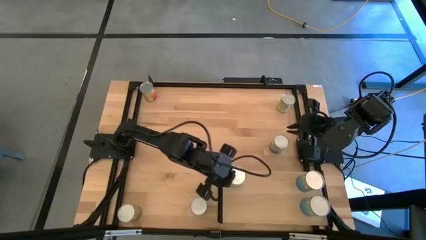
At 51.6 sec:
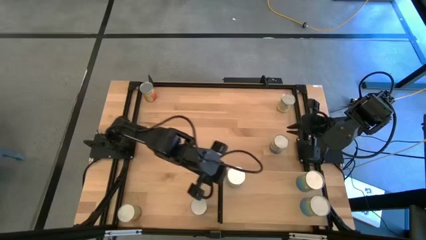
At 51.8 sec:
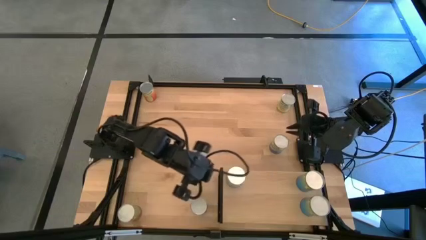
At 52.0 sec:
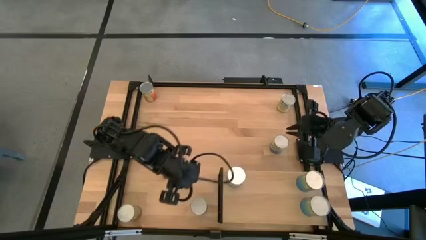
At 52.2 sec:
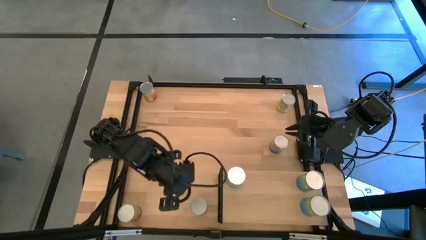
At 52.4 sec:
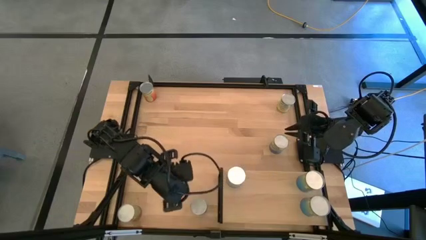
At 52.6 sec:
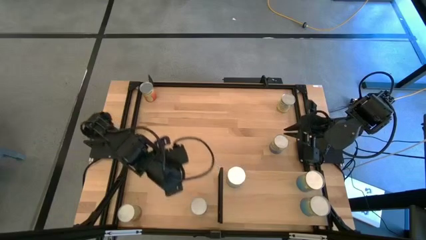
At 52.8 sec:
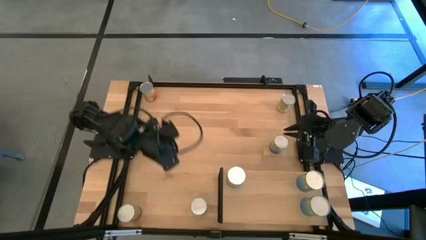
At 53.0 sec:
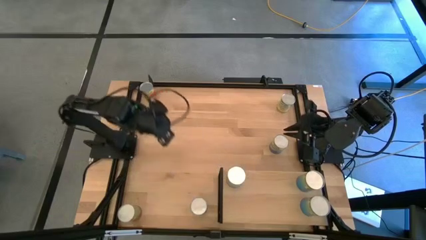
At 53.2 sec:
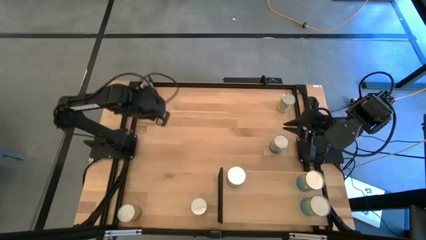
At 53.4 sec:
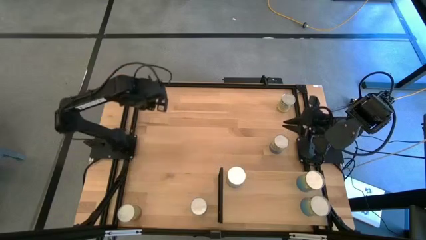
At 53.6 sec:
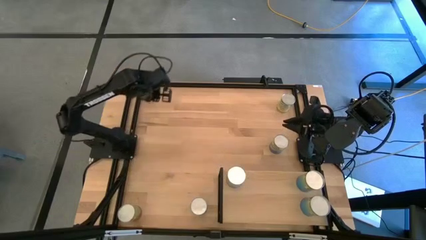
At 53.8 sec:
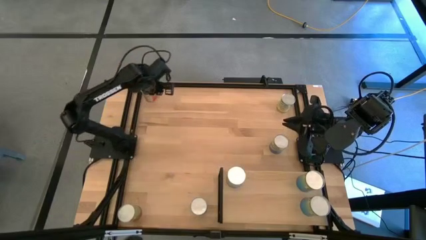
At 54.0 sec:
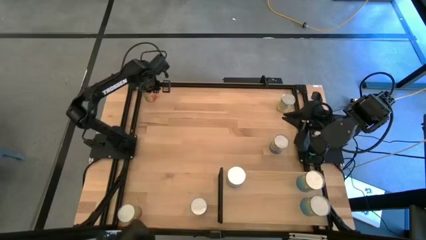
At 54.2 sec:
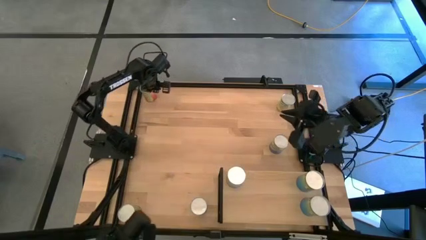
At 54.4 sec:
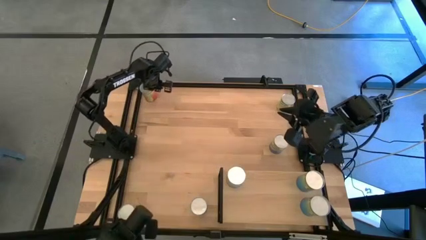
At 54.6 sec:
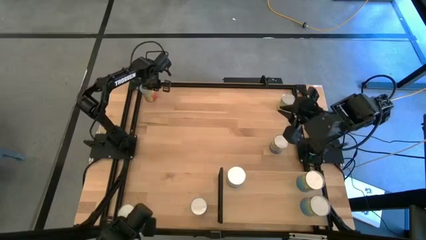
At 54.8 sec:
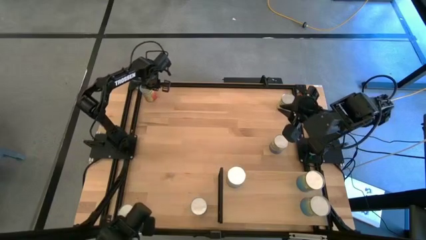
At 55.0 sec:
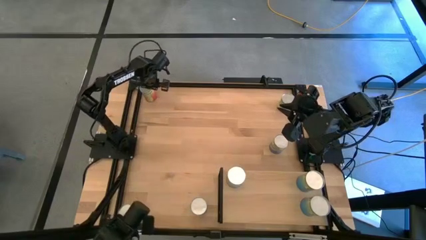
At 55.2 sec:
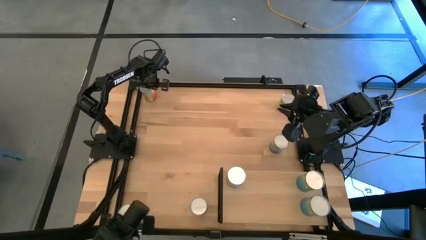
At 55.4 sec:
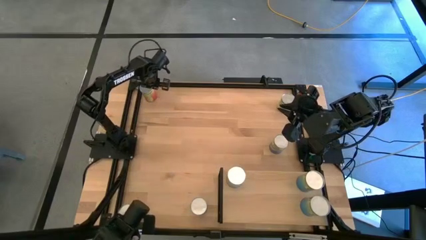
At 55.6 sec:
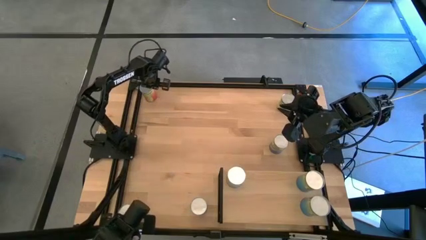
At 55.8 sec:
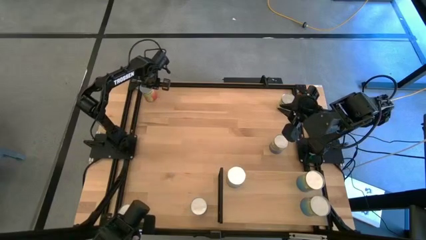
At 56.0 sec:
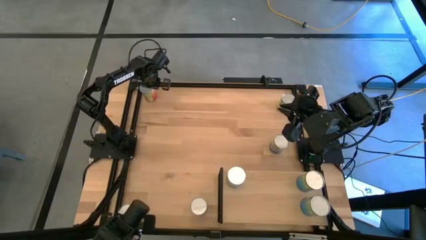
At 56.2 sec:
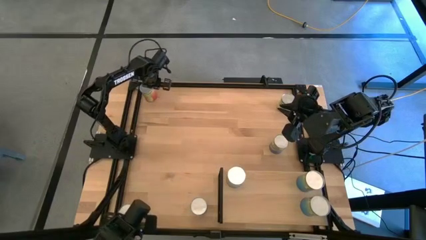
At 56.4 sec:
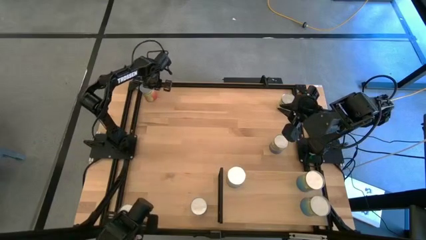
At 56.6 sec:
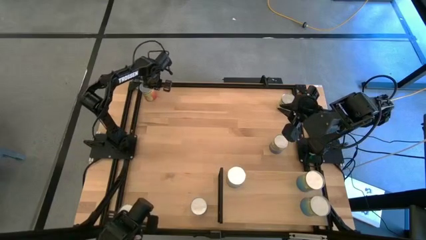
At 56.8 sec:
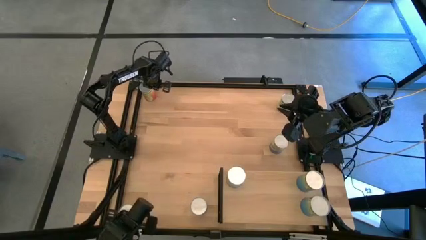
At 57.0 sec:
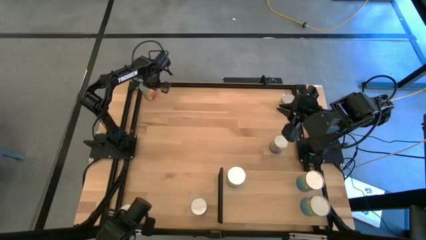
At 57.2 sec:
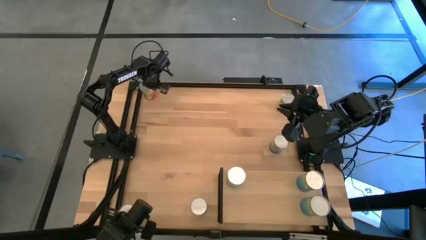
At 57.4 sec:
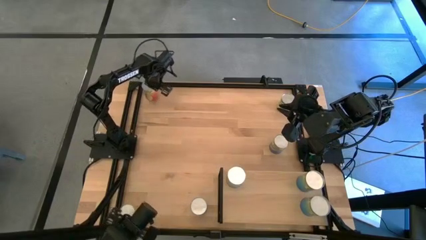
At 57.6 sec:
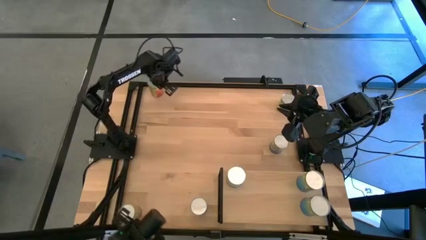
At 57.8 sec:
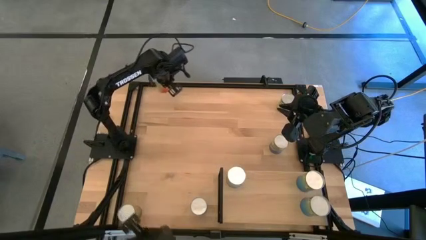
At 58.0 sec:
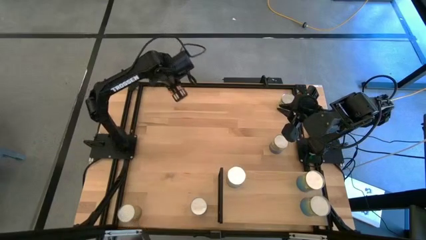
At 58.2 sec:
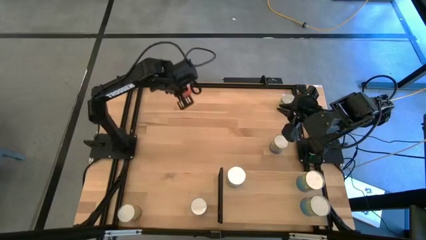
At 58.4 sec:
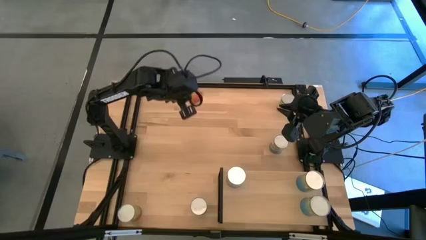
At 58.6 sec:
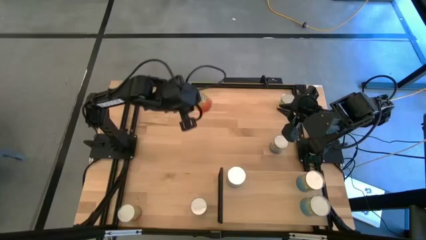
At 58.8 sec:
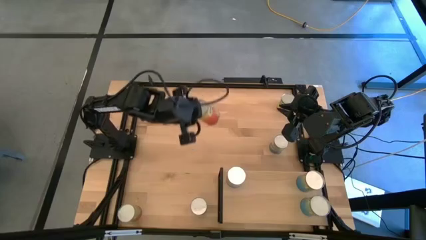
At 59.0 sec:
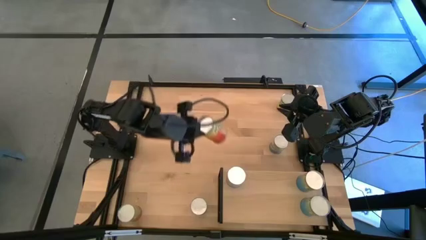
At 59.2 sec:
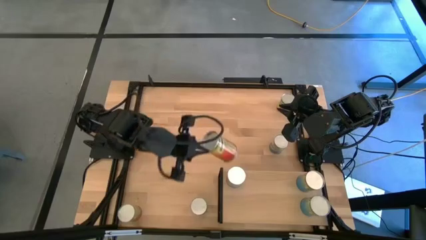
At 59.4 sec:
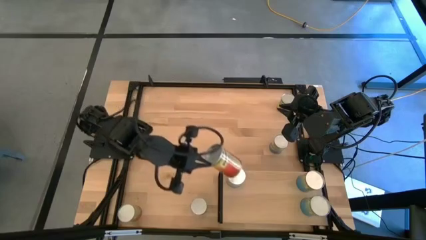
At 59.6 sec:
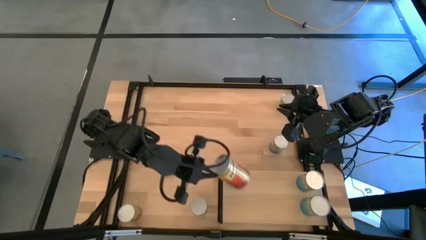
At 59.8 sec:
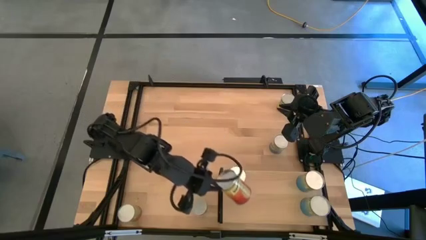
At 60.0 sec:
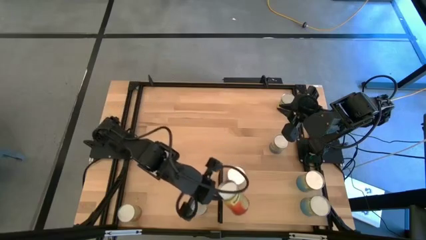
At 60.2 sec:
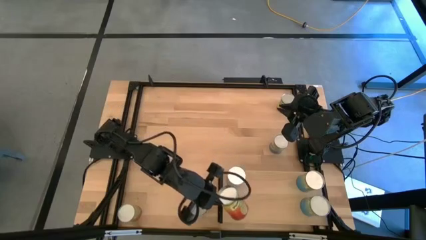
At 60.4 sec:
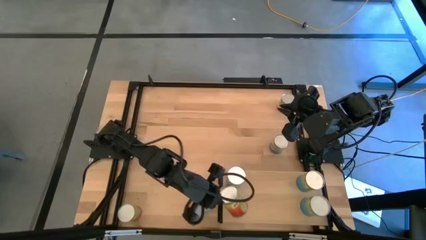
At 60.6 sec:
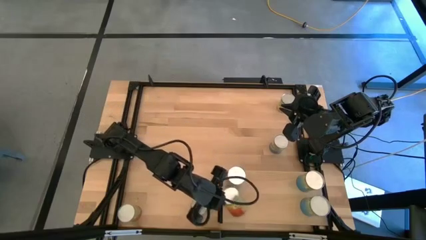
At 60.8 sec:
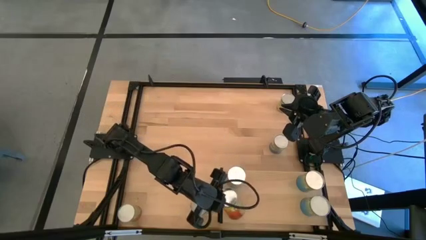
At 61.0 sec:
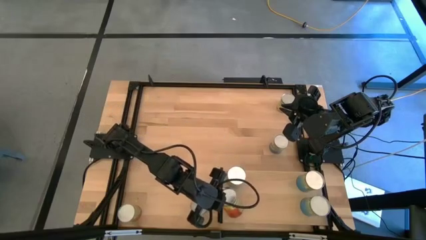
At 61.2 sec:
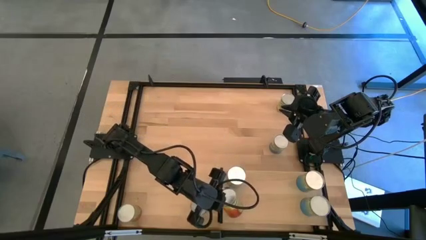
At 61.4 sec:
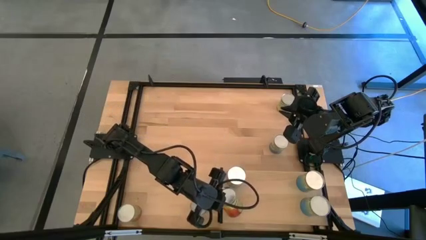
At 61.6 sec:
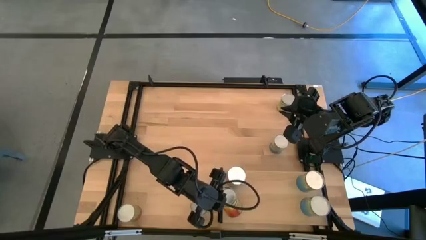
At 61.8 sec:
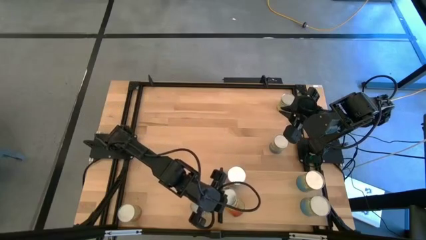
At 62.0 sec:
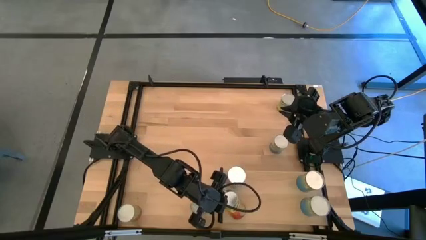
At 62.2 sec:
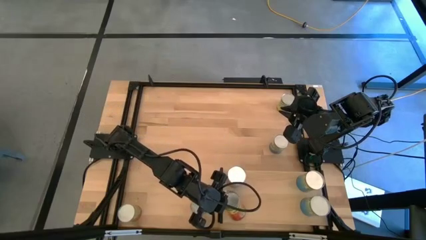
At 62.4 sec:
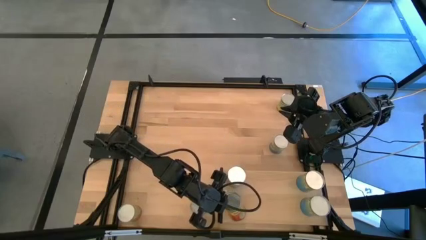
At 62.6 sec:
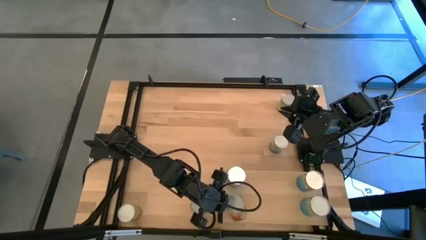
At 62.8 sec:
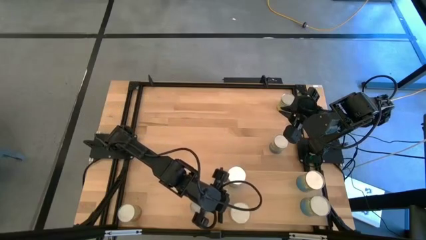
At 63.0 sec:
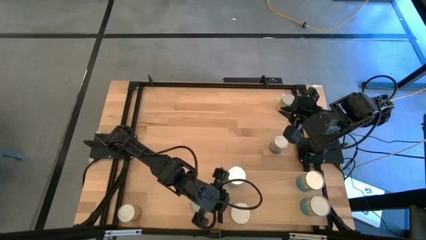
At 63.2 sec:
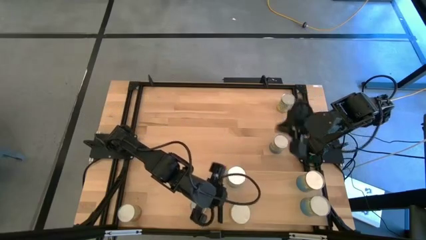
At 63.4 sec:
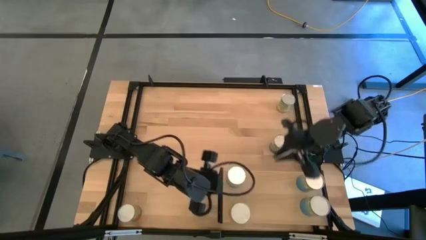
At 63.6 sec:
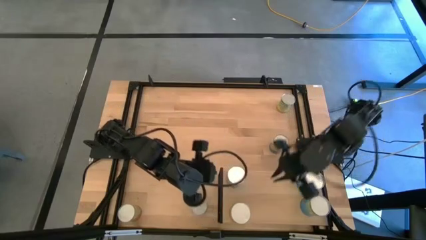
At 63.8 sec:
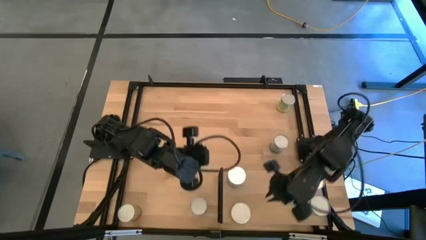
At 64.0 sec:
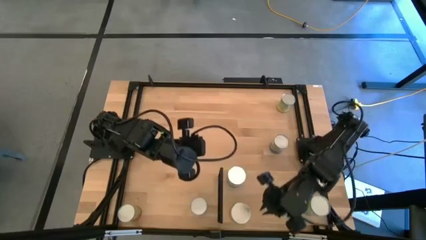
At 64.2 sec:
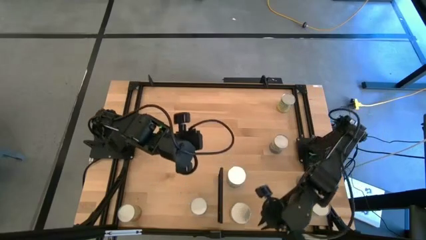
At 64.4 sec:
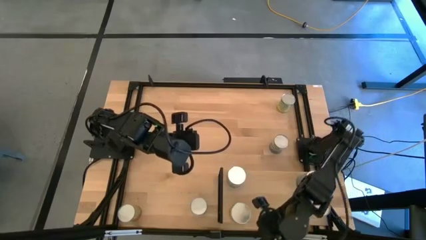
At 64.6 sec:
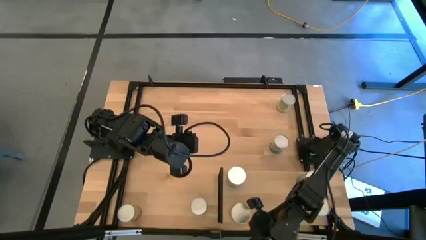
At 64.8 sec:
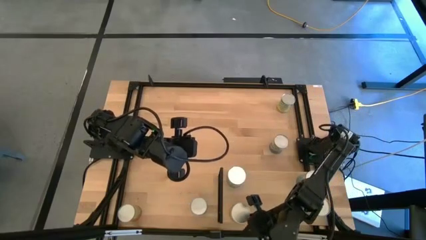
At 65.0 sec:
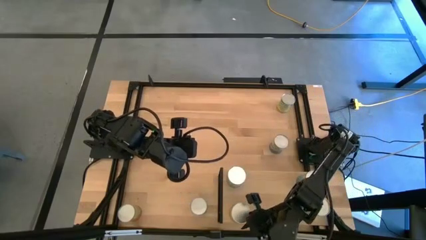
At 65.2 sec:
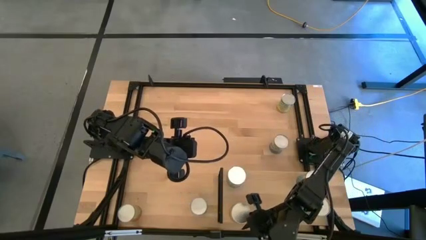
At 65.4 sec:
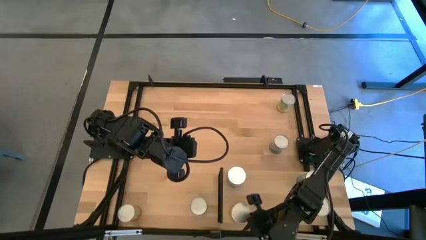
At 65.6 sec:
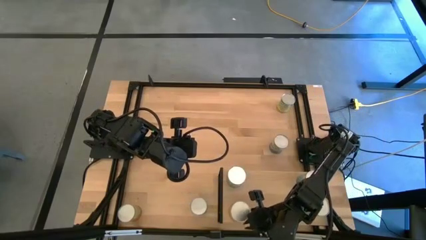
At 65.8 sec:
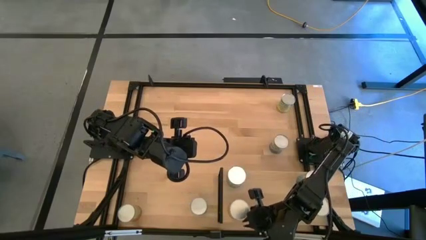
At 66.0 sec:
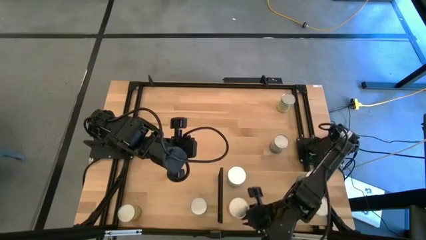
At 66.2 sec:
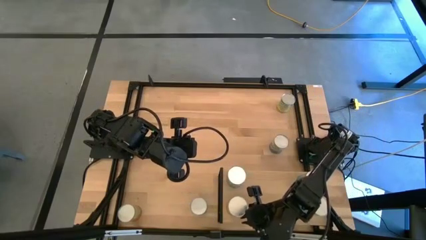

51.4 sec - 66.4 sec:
Task: Pick and place cans onto a shelf
Put the canned pineapple on the shelf
